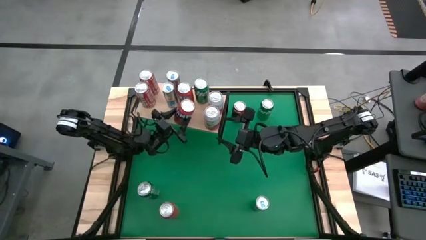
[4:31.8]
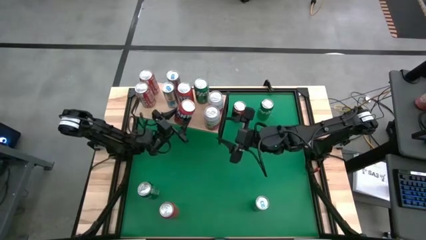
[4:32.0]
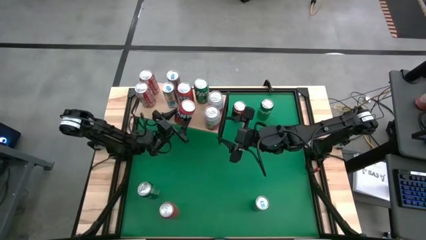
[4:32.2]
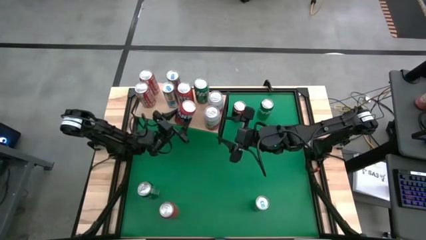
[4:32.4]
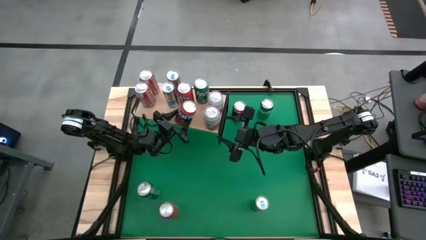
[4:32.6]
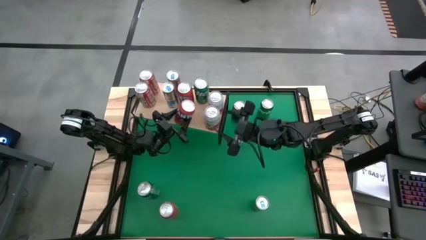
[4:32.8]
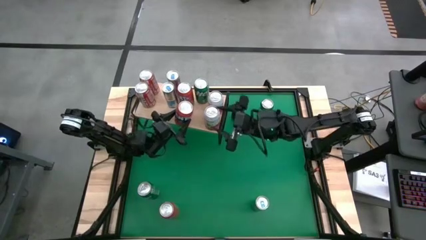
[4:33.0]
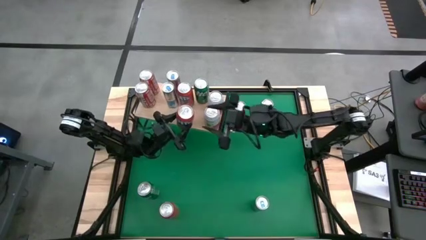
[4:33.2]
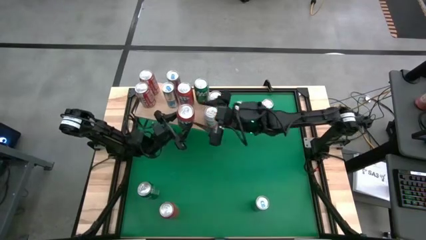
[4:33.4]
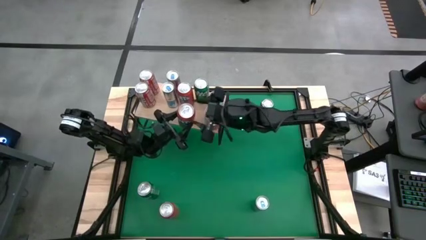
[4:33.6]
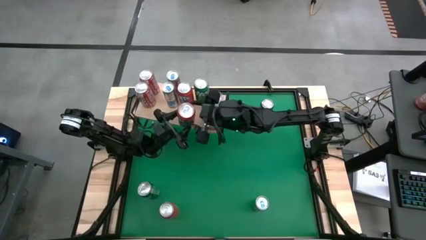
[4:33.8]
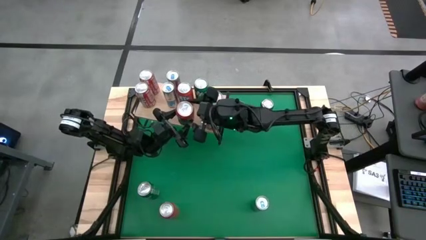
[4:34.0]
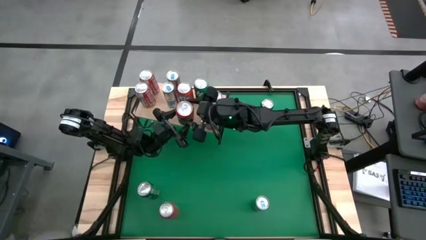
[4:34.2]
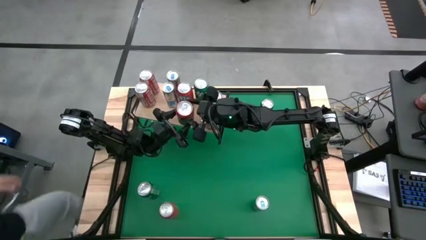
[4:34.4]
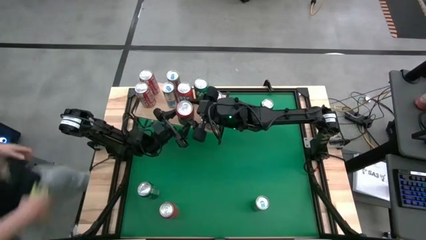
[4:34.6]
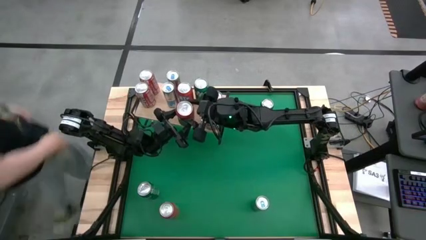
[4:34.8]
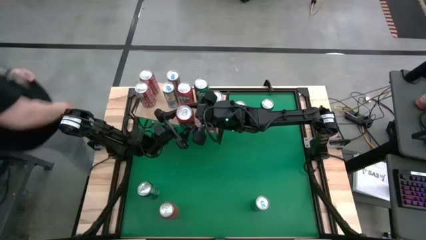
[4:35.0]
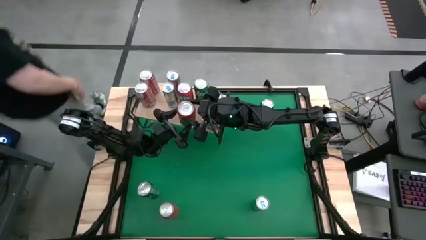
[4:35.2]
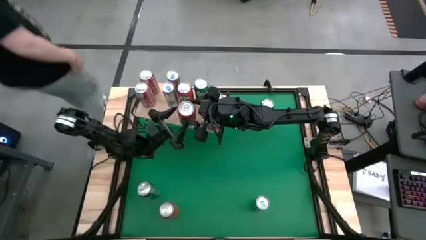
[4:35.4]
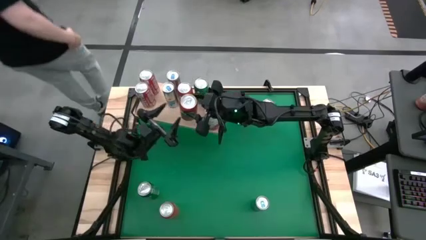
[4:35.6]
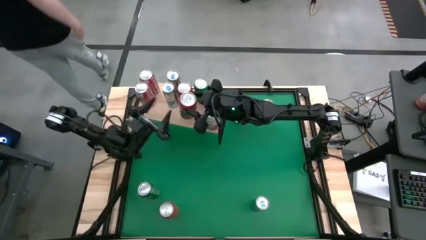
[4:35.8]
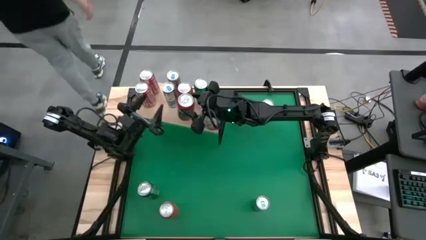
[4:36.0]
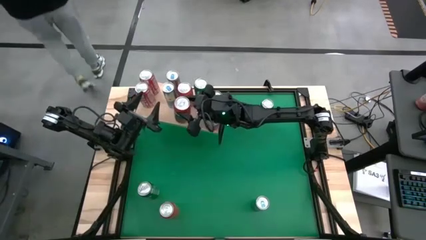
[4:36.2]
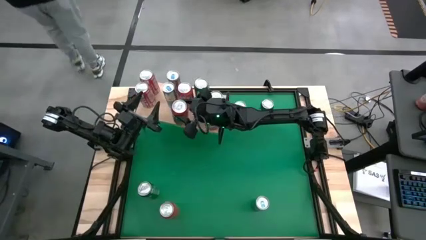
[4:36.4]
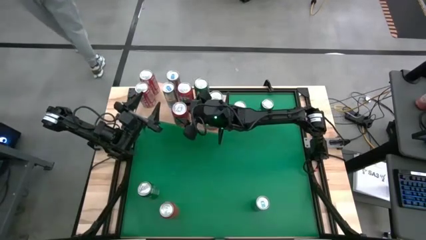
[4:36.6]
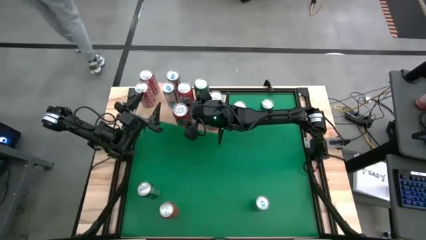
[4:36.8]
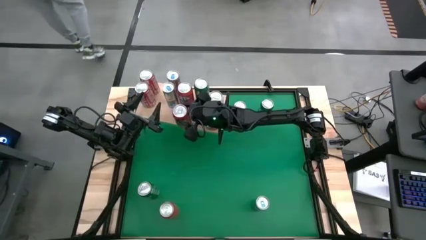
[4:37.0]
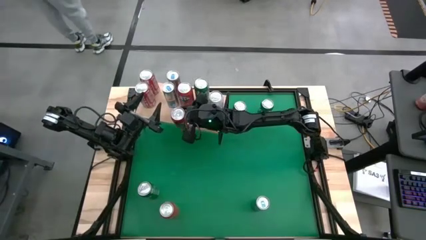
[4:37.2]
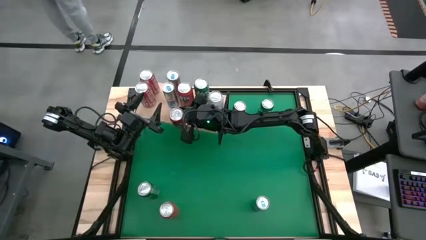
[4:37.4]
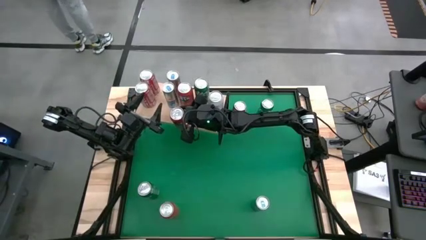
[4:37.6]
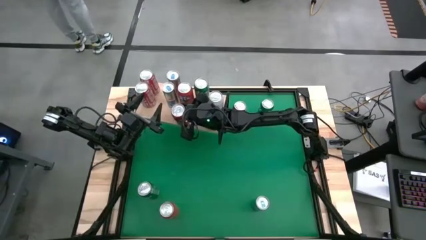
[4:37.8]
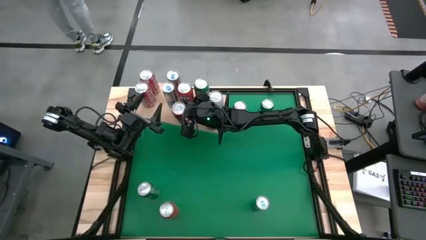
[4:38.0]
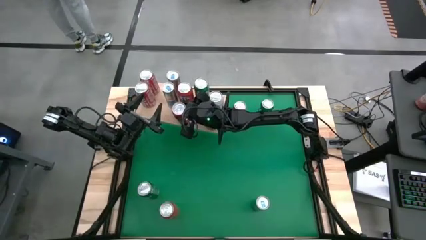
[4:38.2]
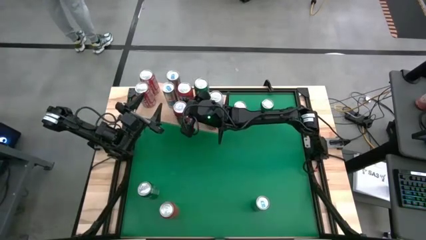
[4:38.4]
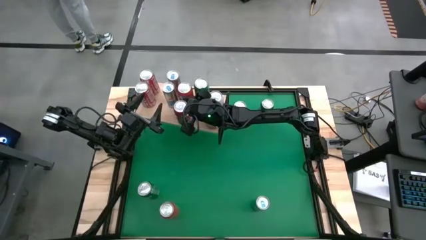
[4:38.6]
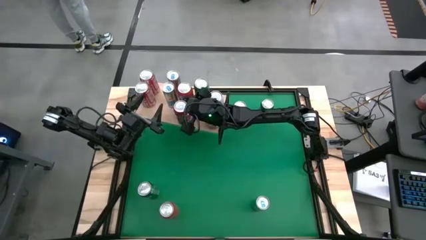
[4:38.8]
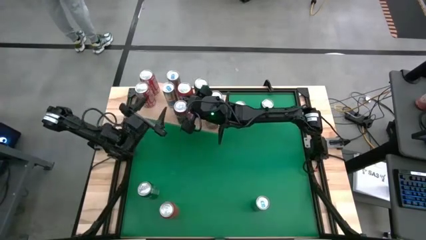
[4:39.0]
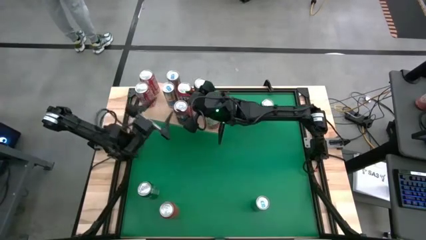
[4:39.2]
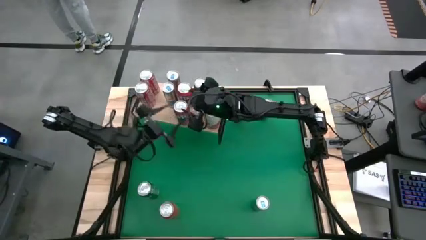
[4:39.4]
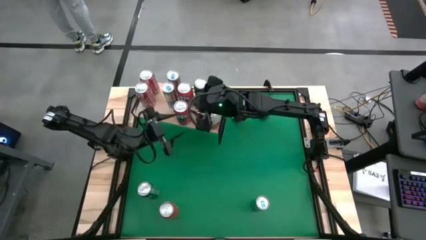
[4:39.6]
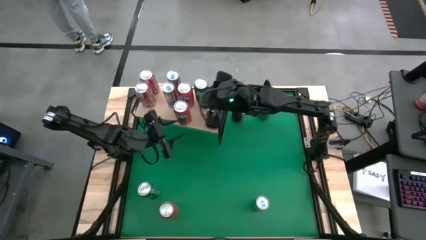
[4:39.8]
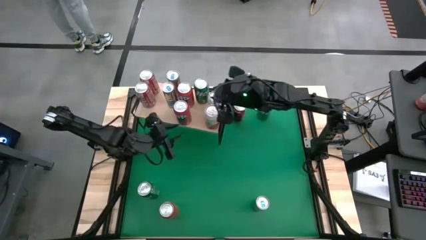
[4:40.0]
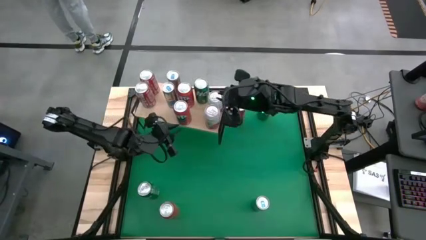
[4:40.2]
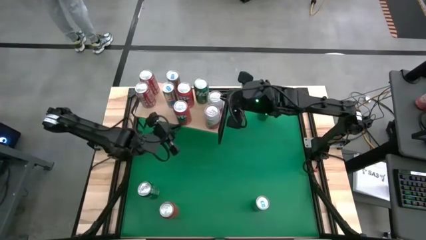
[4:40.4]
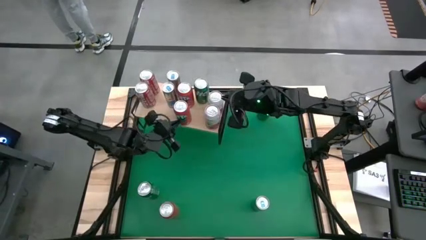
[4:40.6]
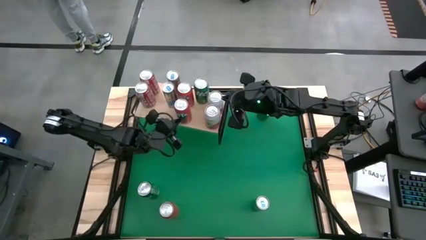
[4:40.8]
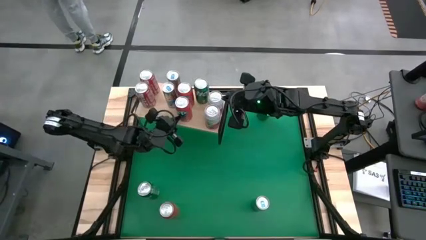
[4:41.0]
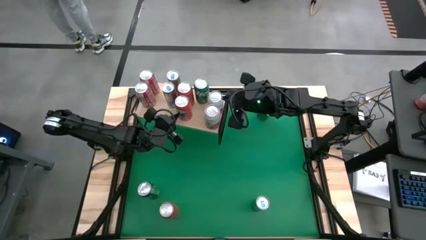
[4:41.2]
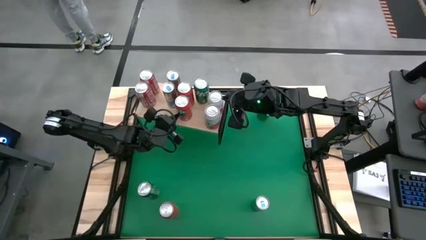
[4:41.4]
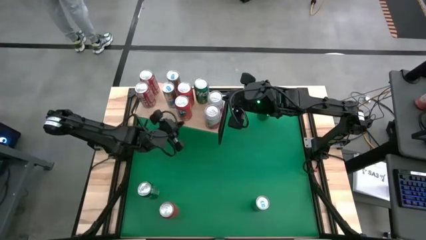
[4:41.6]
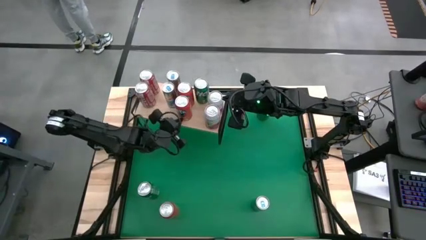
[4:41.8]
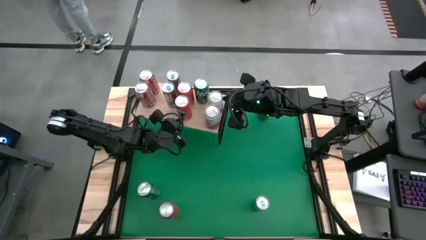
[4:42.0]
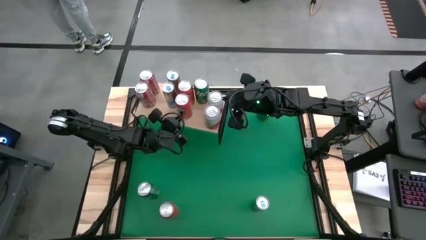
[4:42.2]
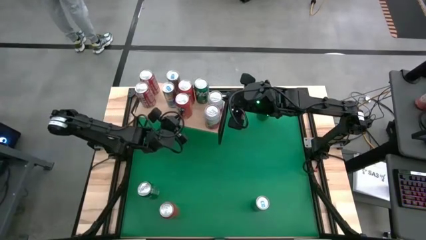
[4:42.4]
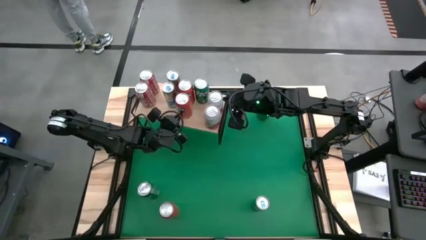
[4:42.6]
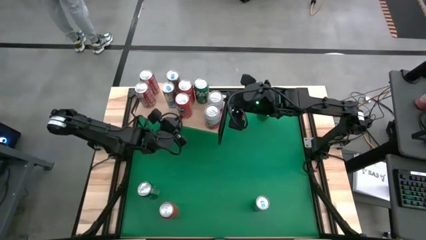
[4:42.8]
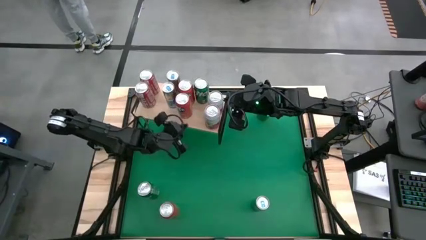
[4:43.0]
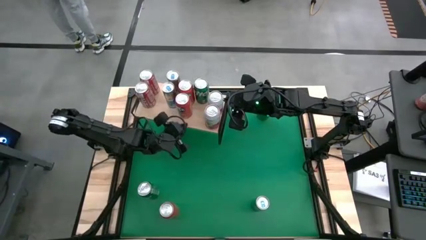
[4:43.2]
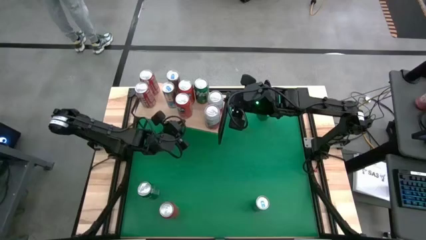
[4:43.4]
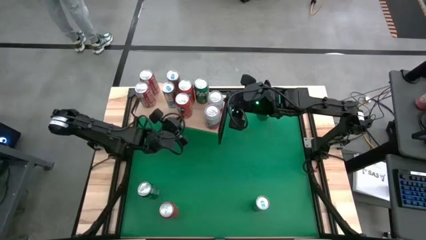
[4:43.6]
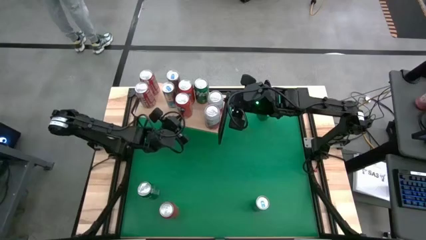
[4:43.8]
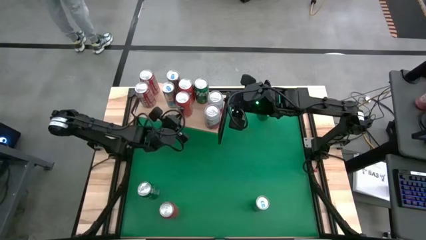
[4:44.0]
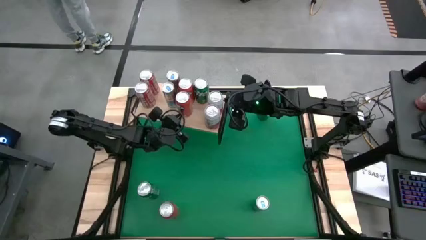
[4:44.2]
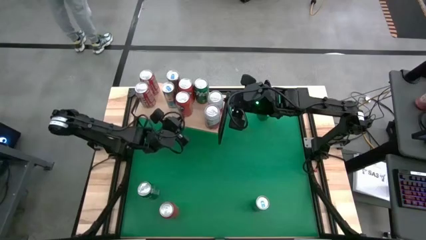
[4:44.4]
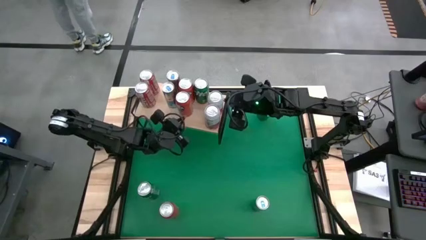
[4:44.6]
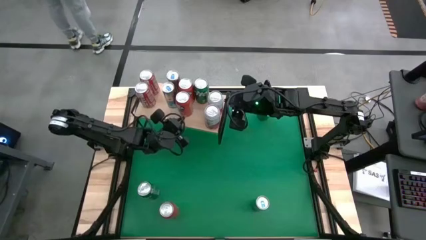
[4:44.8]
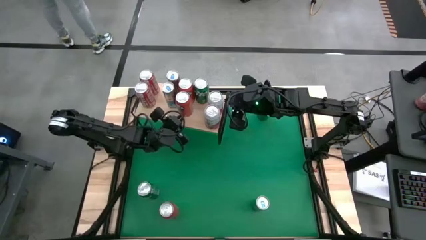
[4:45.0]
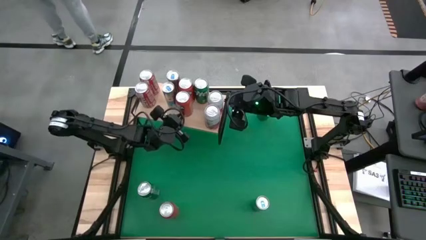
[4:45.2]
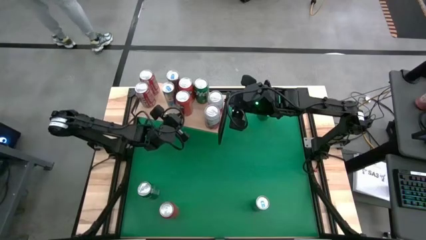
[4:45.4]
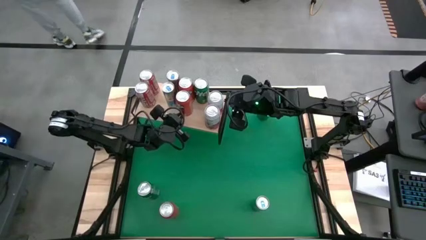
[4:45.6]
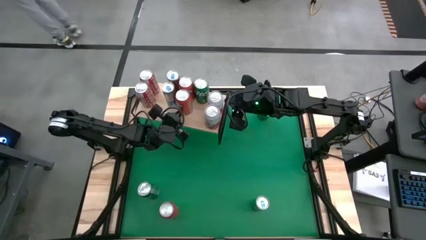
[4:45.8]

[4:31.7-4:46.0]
Task: Place canned beverage on shelf
Put the red soda can on the shelf aligned with the other red soda can

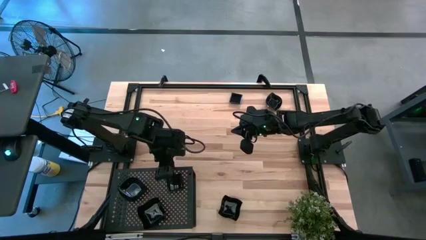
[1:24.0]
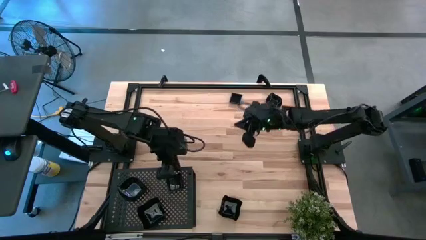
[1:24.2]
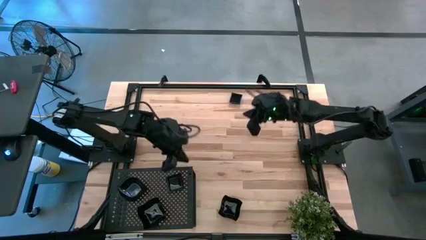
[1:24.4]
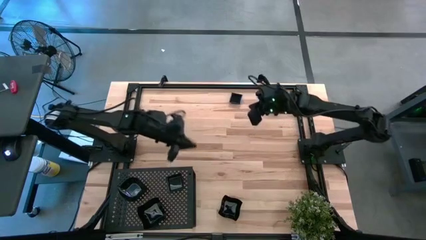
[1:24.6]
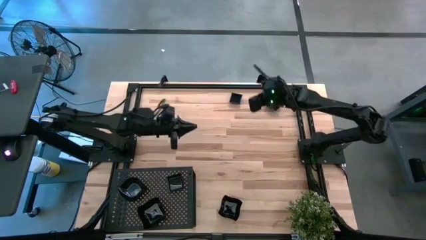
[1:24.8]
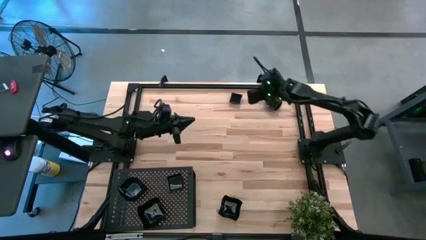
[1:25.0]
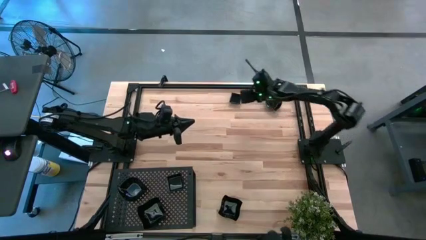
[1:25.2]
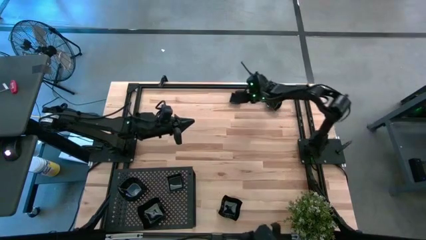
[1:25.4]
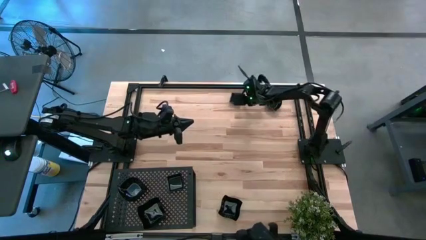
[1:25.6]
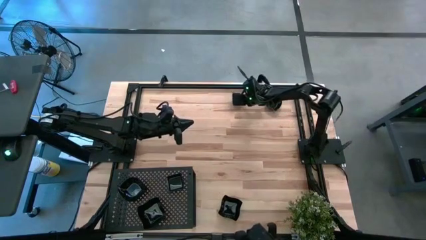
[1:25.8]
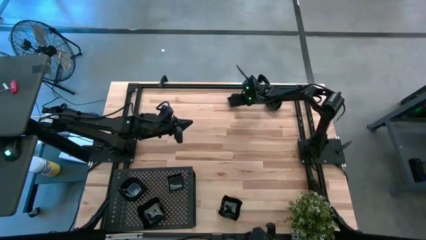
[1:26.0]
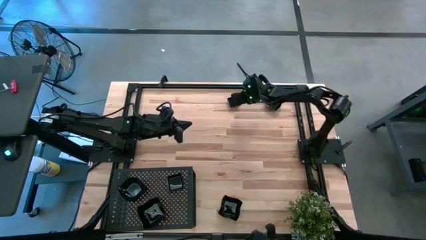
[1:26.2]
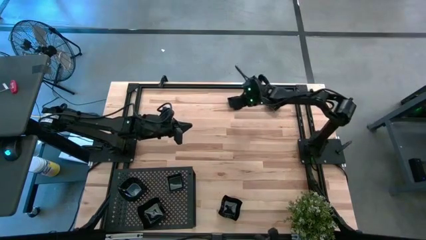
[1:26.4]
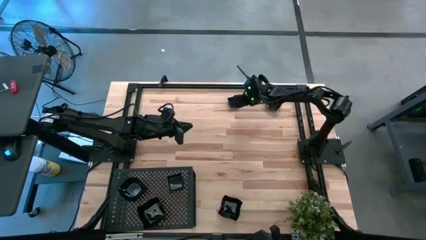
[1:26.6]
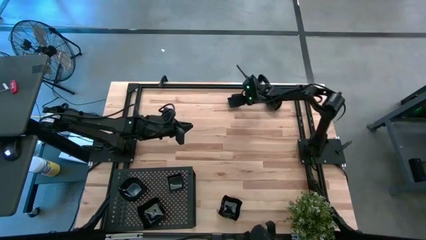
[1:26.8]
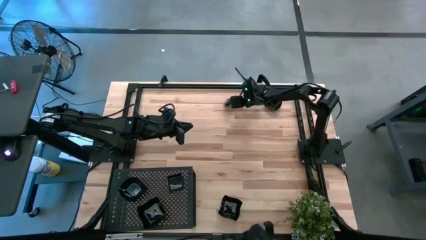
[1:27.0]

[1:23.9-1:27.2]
Task: Pick & Place Mini shaped plates
Stack the square plate on top of the square plate on the shelf
